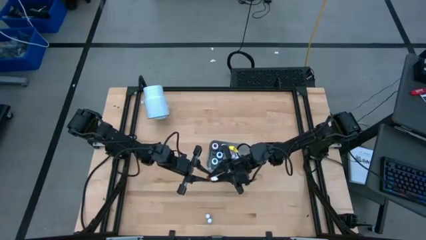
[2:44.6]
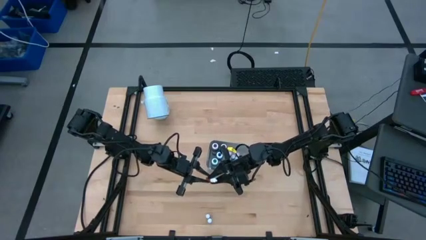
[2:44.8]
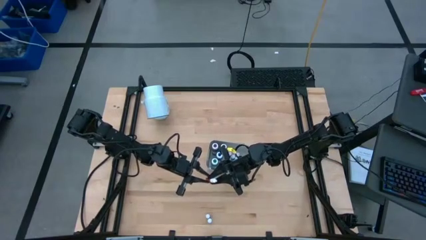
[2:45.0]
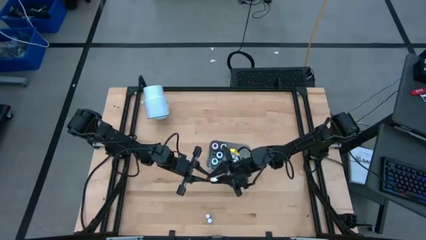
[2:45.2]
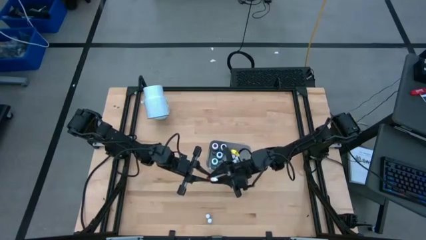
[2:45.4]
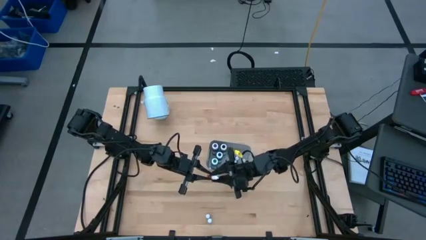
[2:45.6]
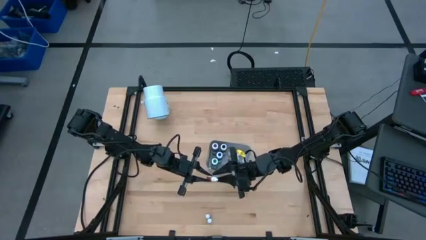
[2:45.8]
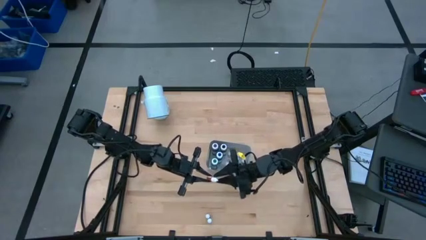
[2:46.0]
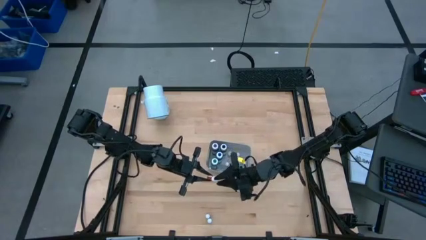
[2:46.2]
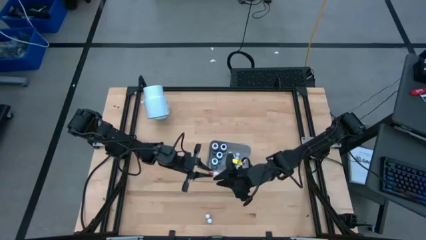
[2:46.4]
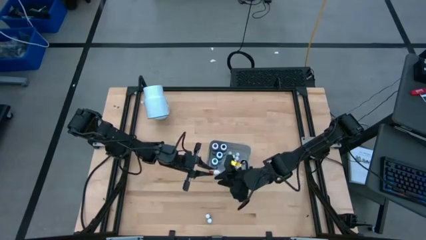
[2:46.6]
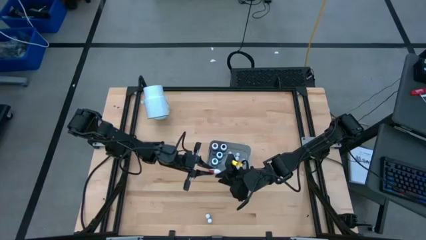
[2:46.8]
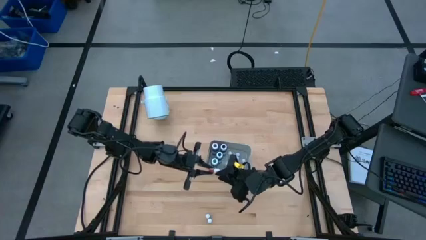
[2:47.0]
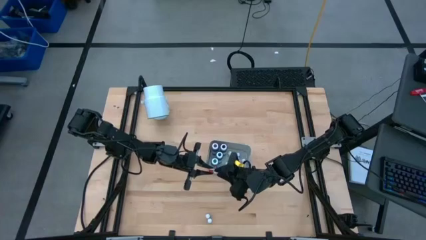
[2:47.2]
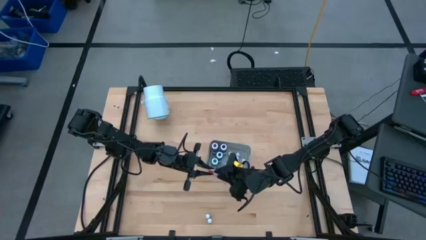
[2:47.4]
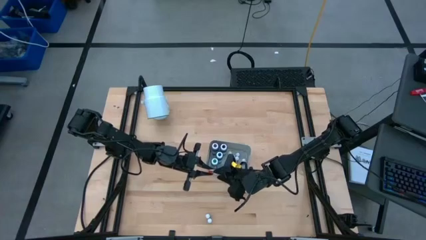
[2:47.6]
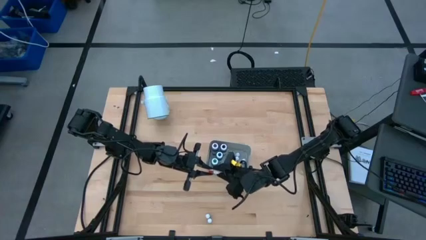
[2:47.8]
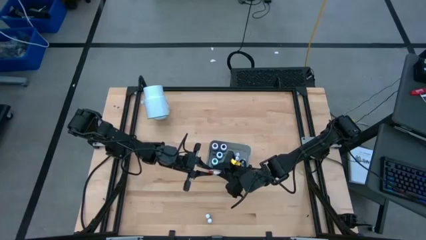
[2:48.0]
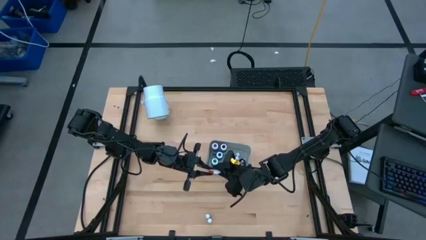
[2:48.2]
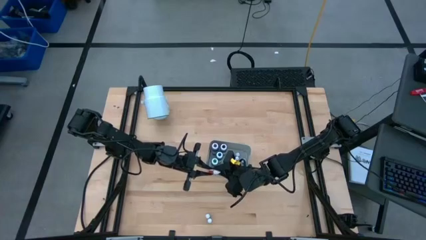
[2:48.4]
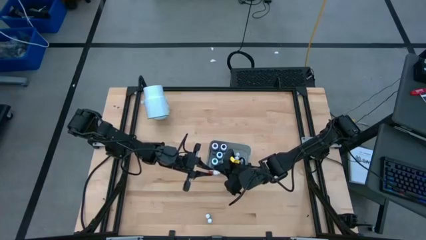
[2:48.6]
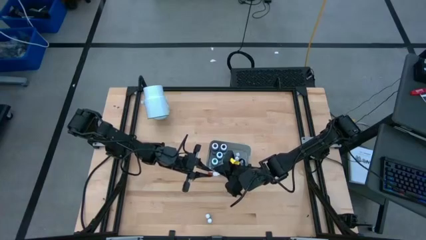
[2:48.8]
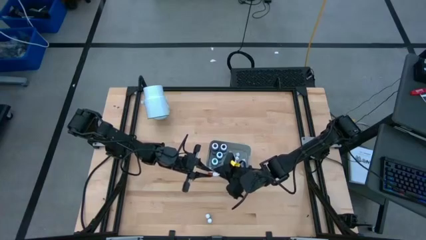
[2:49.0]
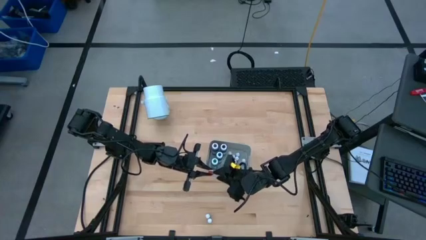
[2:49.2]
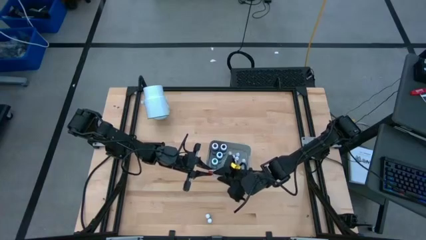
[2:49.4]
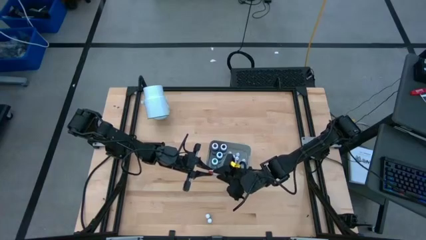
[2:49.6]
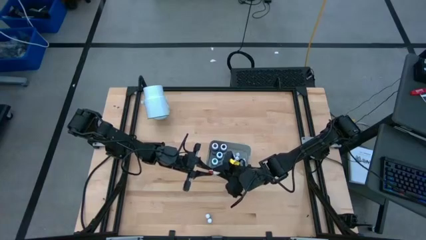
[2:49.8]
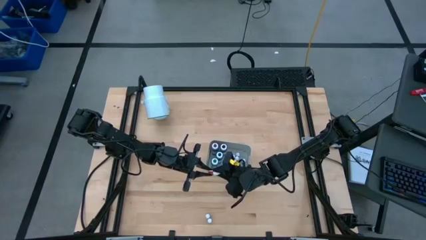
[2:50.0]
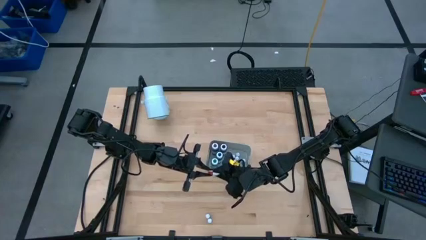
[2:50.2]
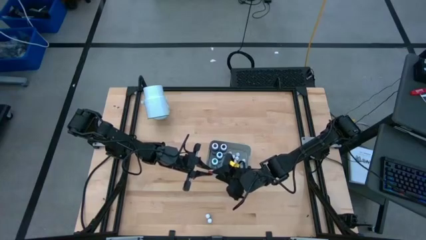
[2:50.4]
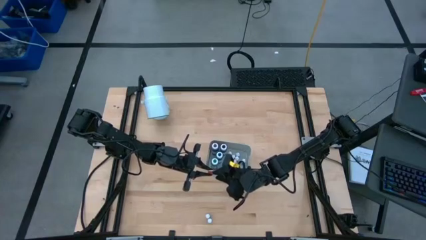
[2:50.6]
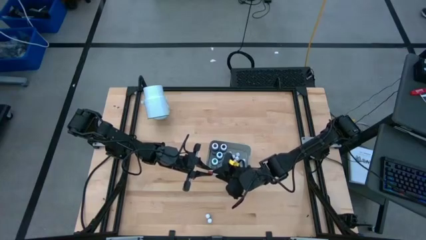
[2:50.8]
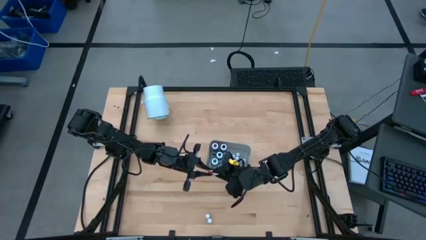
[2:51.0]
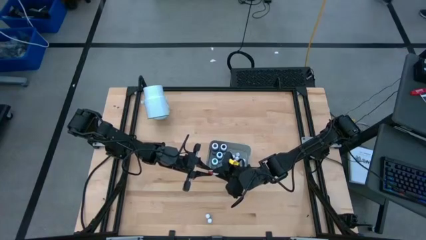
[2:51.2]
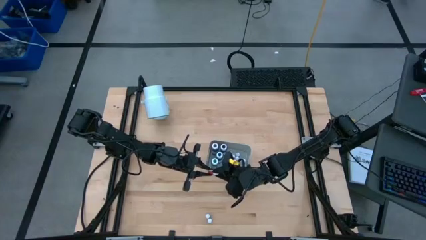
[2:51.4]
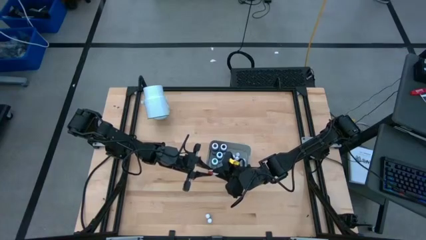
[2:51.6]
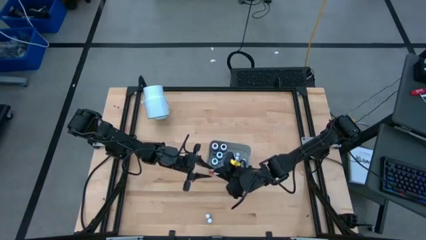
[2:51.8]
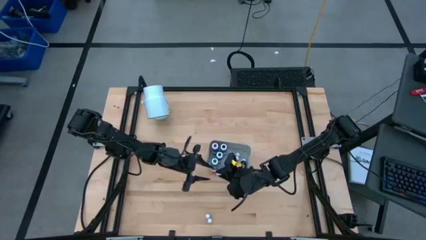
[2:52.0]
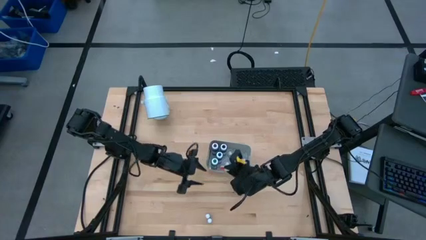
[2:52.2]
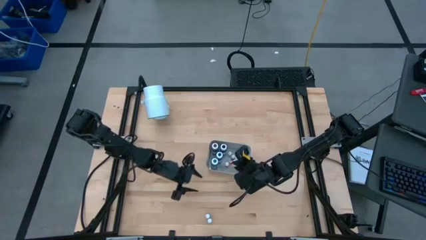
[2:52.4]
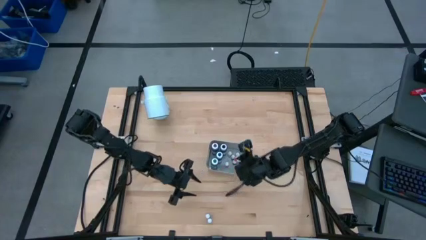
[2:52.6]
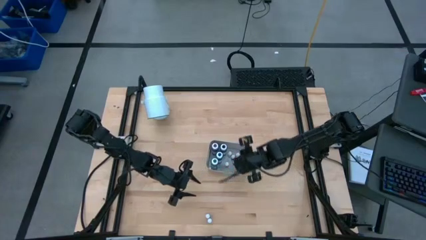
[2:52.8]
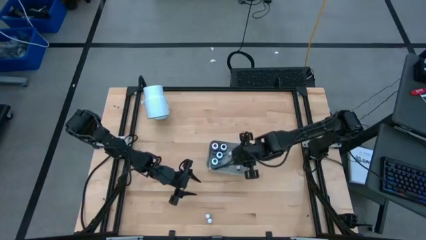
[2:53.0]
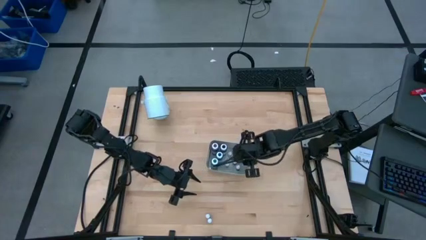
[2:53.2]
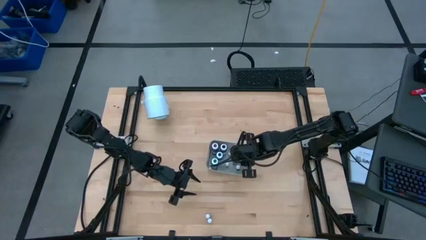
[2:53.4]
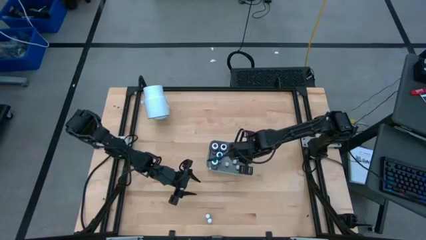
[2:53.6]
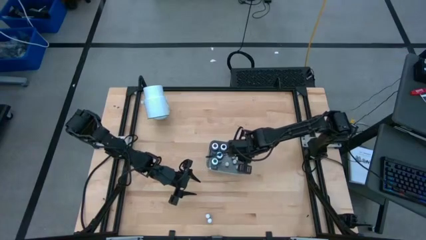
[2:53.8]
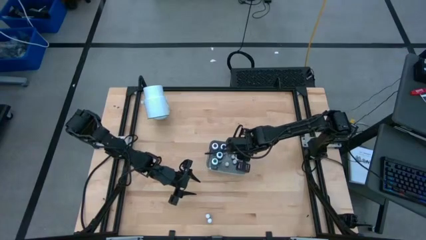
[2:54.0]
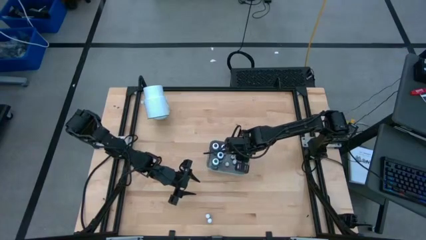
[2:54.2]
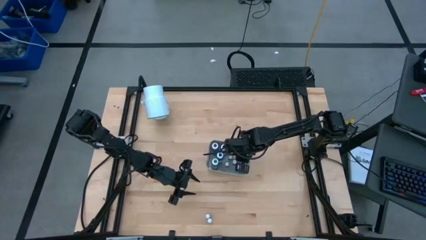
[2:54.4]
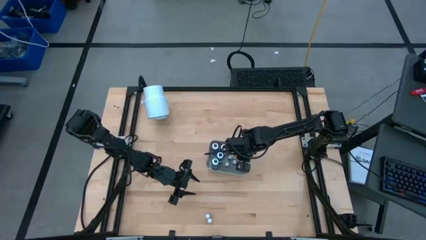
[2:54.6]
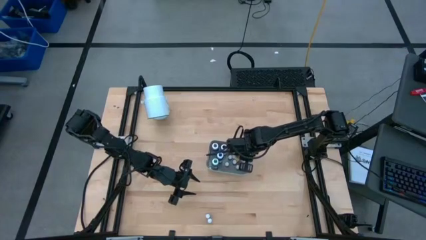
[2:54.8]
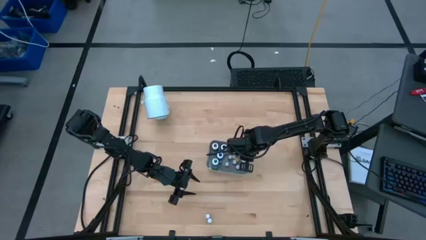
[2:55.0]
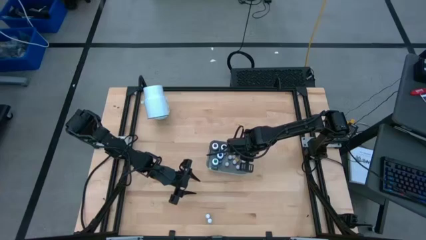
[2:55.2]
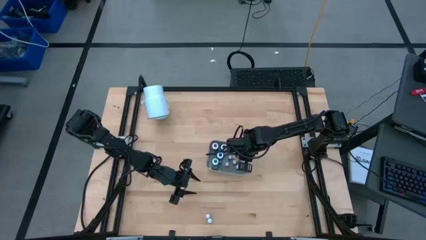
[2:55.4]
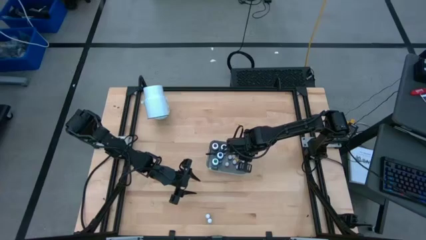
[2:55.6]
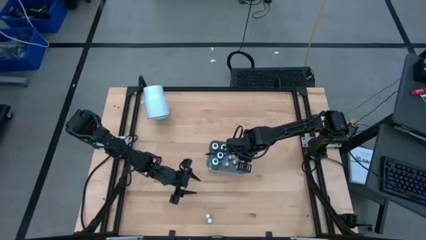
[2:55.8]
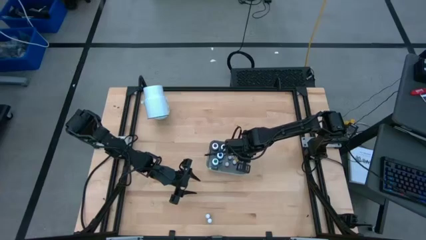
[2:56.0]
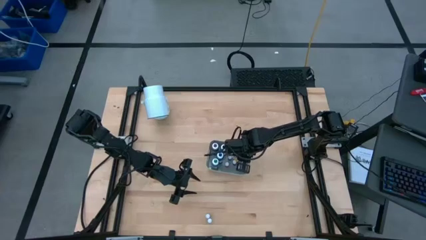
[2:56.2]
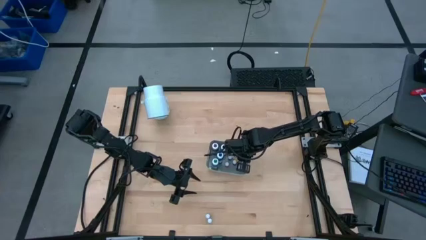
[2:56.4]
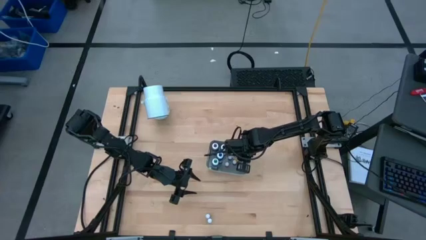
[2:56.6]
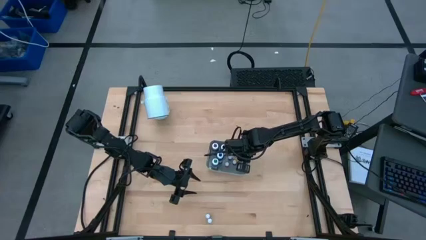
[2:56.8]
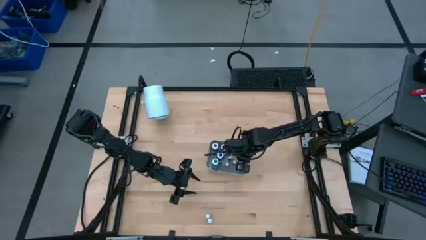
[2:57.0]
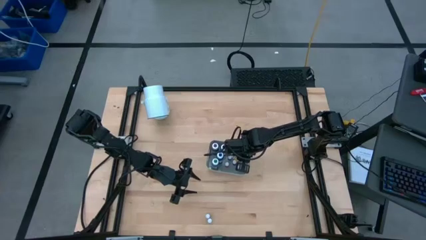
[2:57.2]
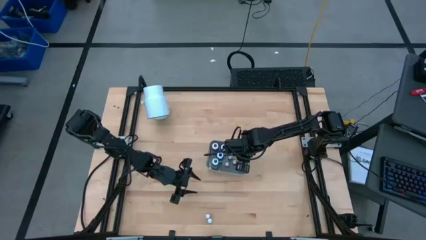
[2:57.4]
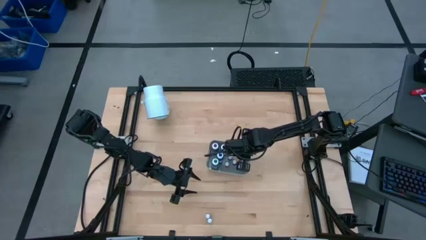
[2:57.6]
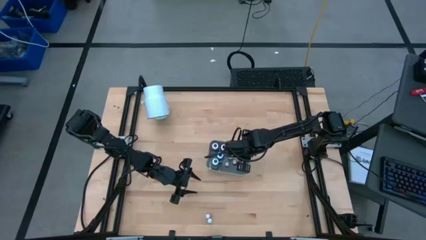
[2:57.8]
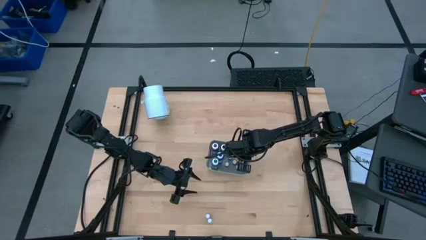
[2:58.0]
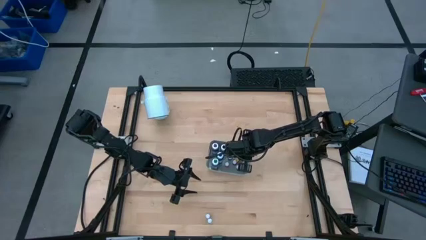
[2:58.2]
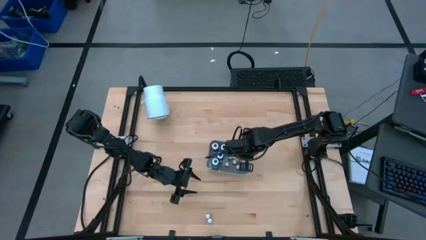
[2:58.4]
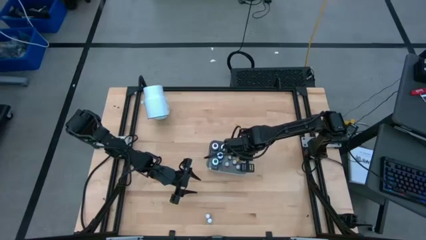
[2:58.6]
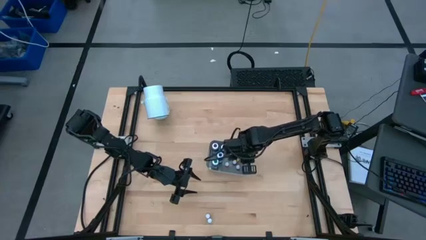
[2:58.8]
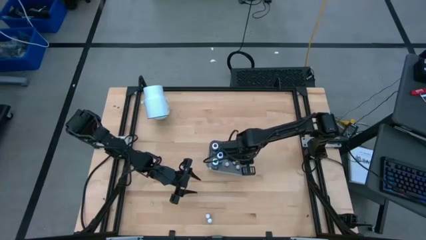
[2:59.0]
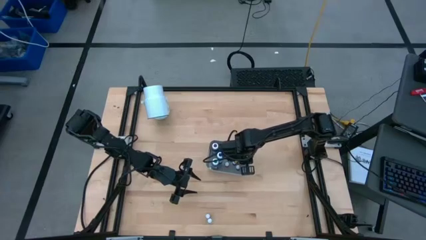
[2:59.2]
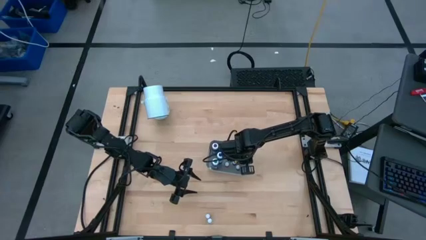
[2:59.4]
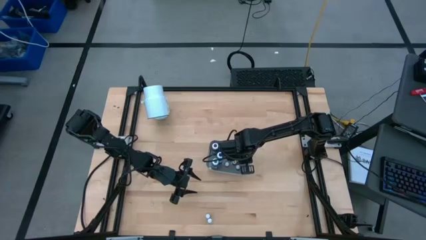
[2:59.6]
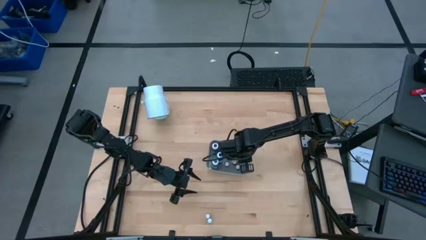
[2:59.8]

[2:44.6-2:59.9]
Task: Pick & Place food coloring
Put the small orange food coloring bottle into the bin
